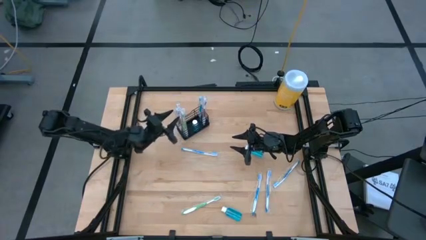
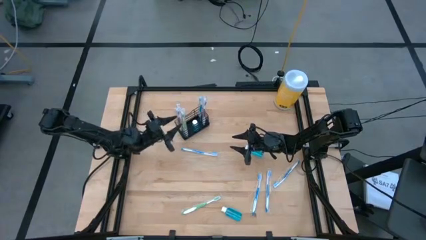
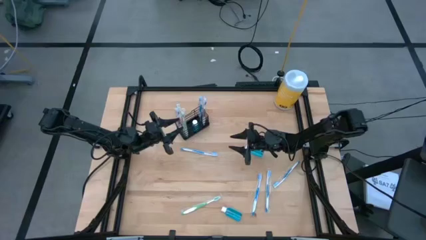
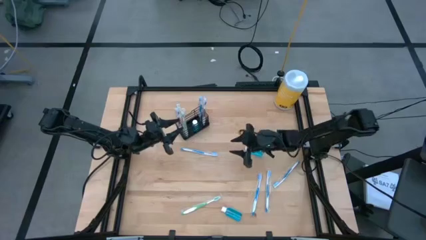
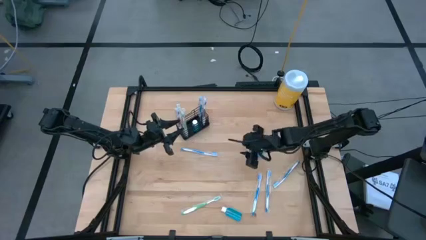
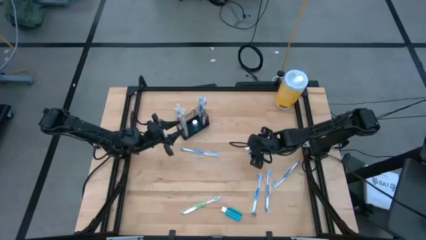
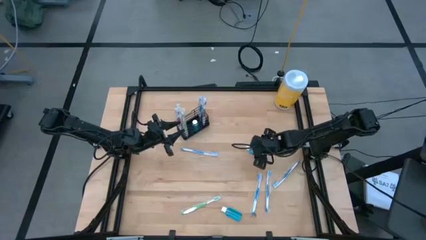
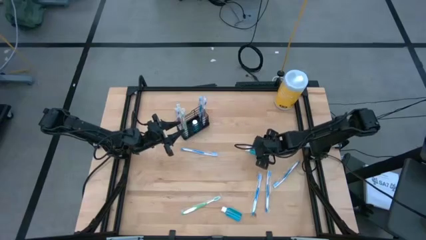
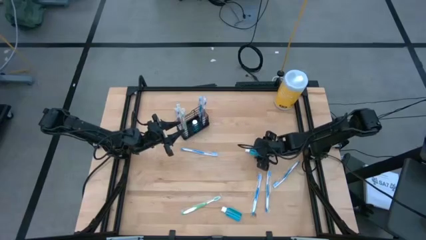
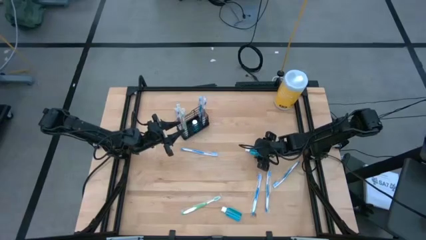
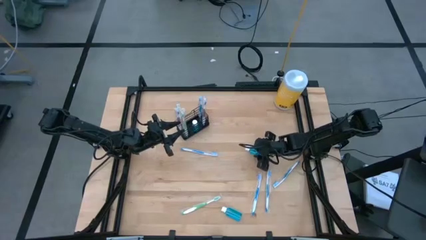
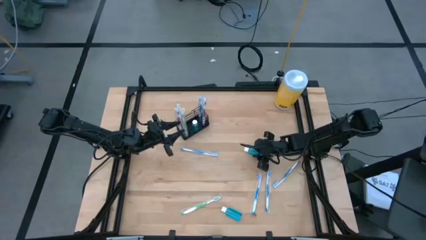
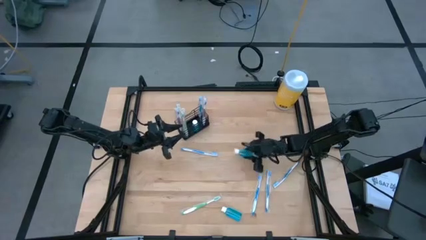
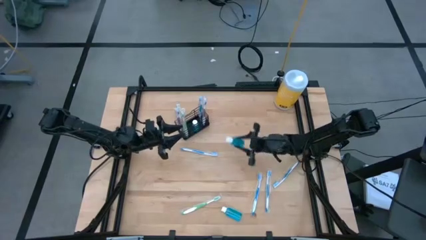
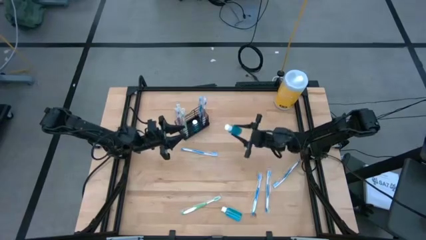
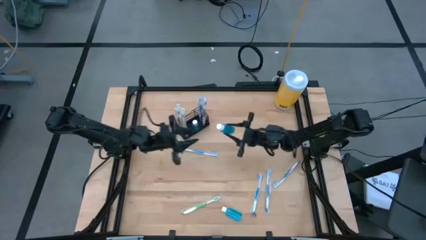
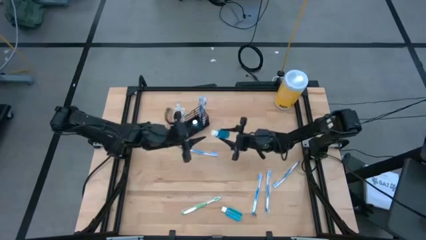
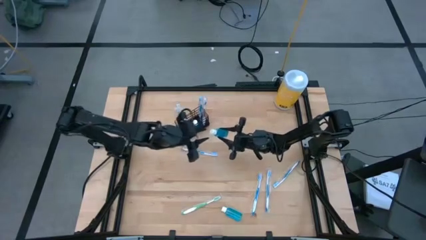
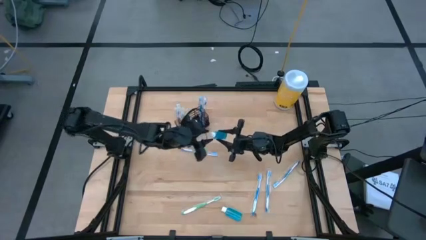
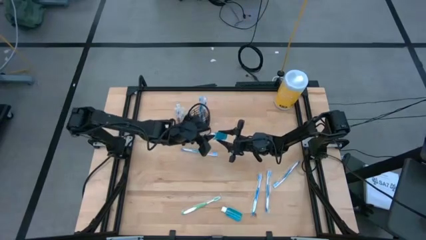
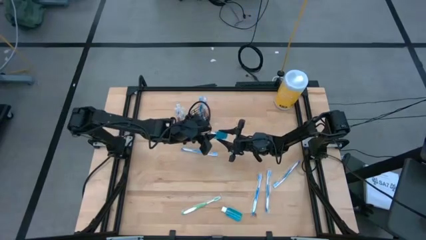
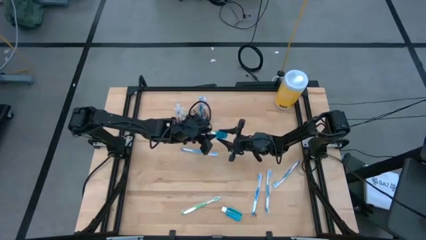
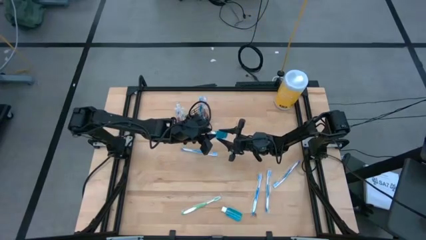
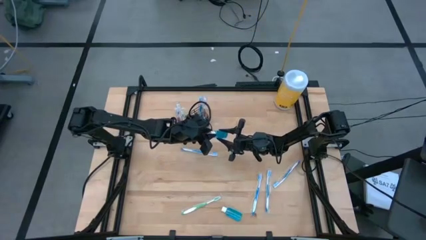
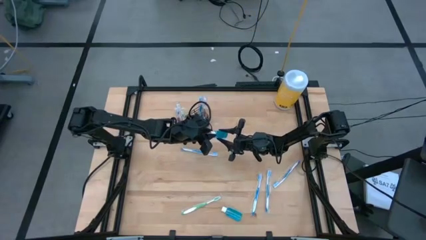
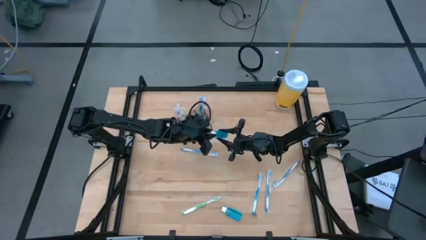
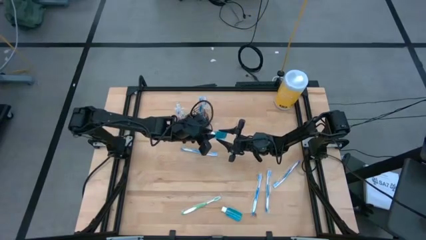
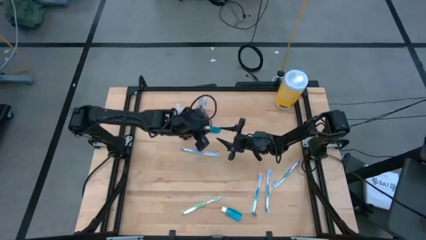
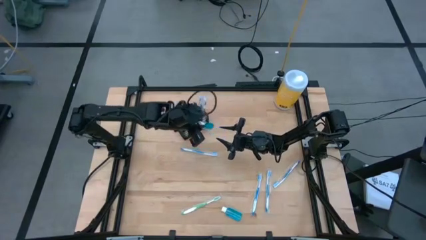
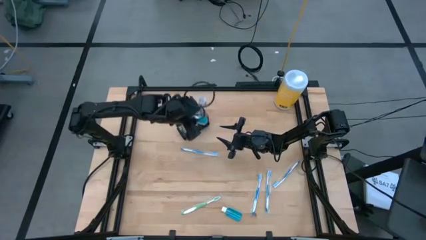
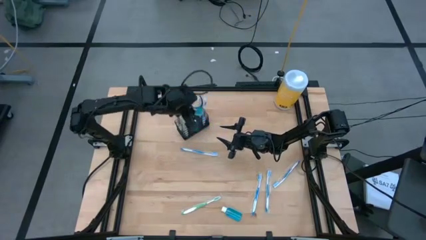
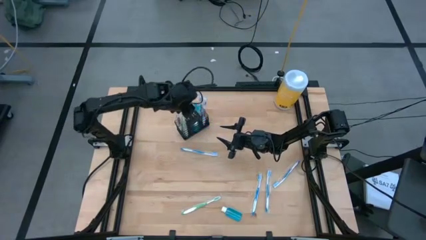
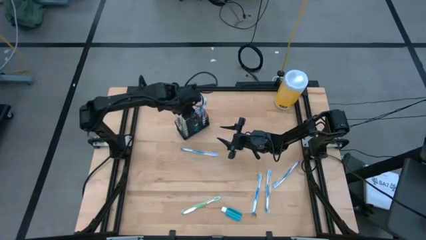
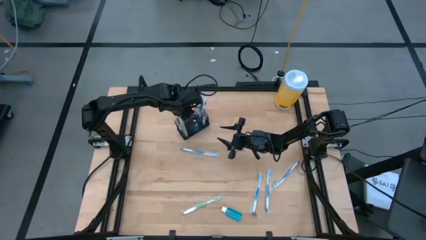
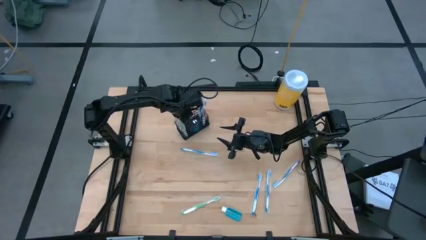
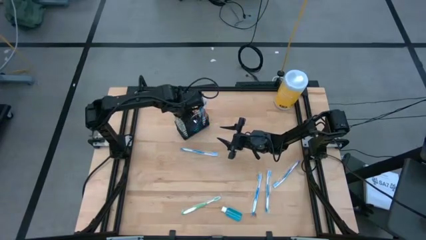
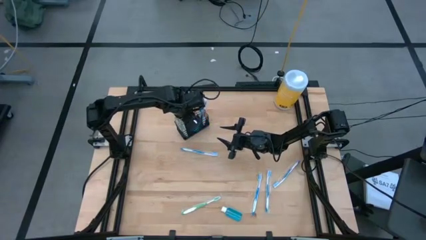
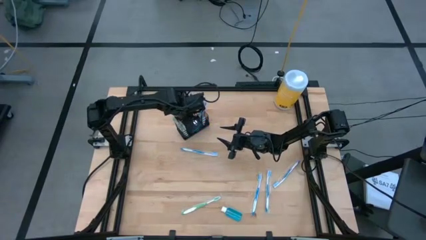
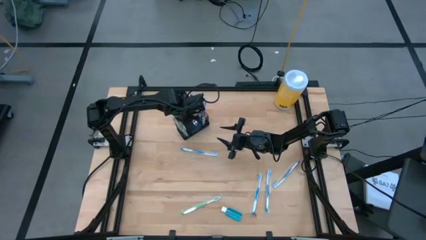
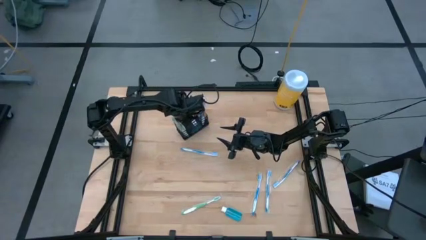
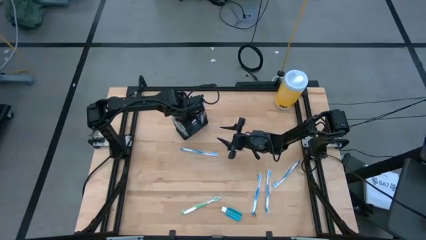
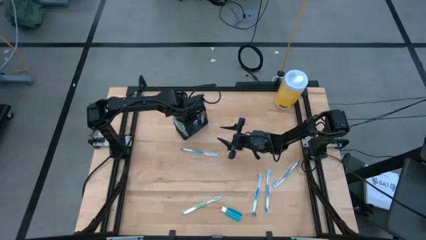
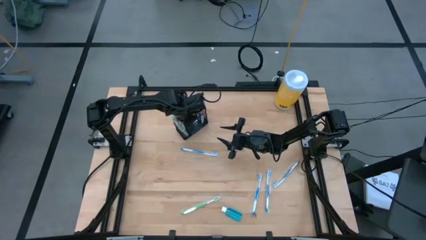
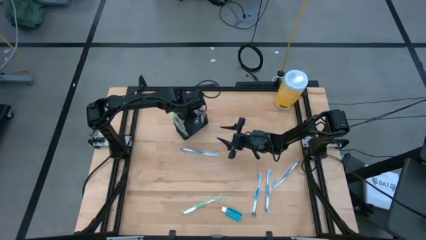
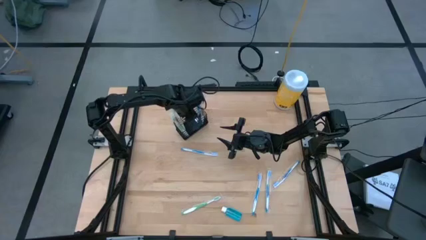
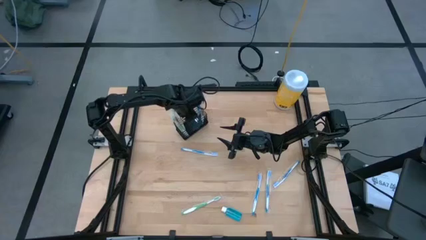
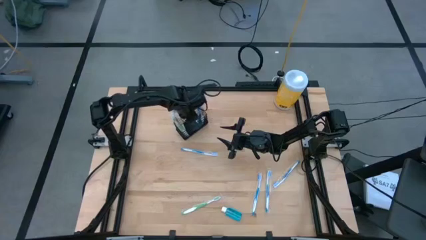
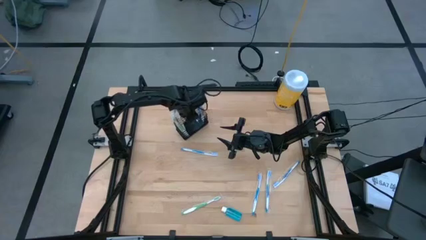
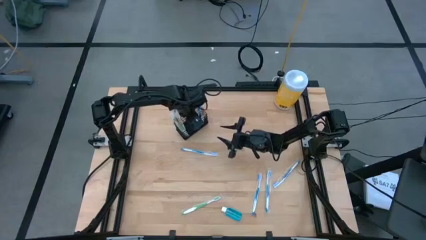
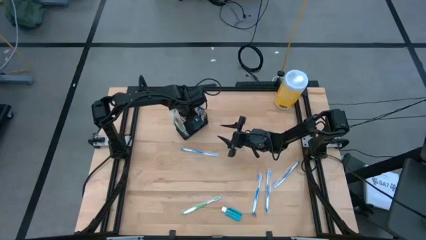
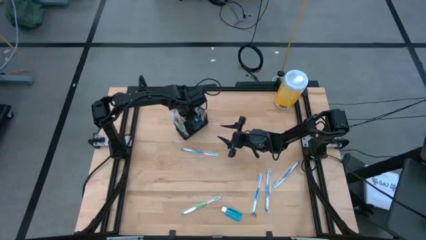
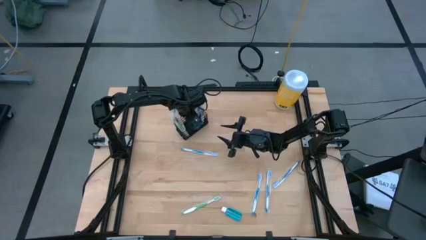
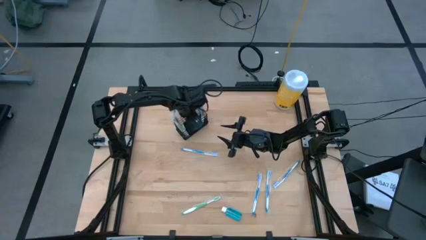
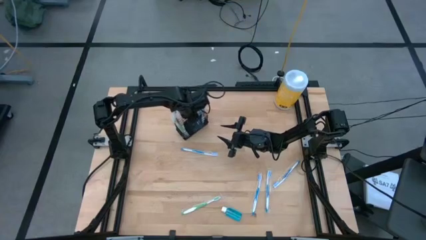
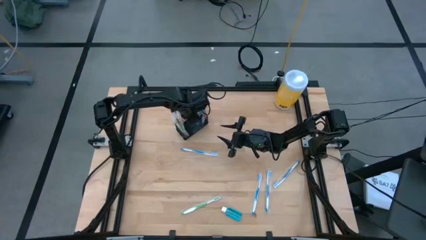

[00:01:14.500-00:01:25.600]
Task: Pick & Place toothbrushing station
Put the mouthwash into the black wire organizer

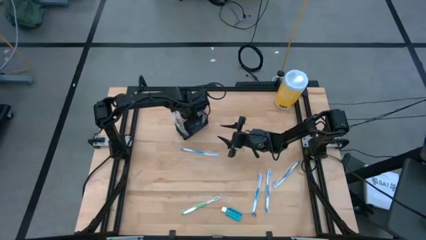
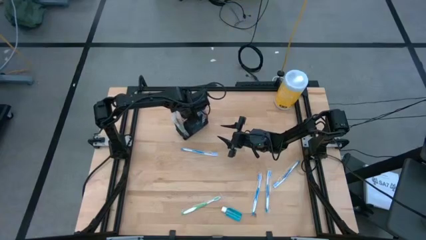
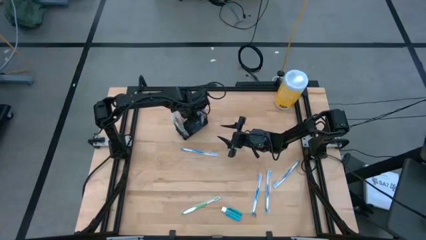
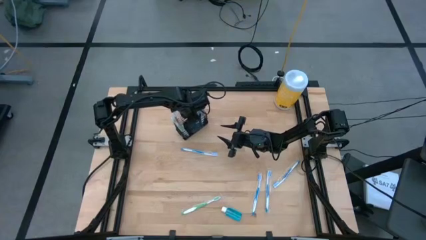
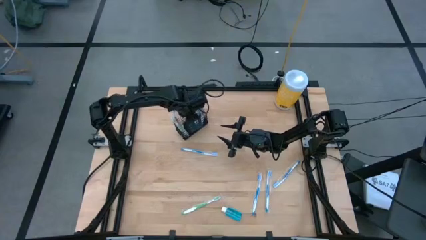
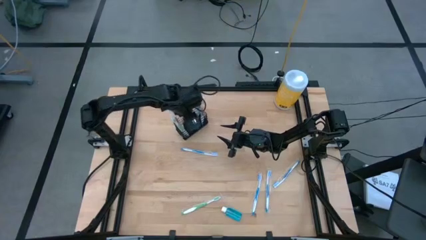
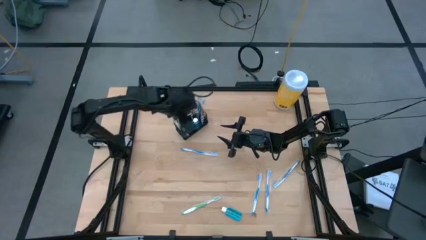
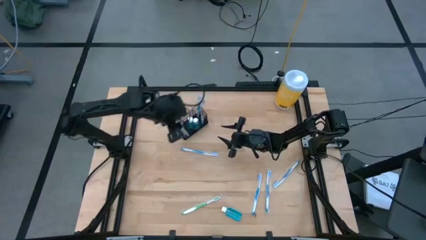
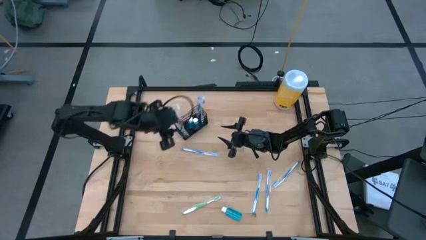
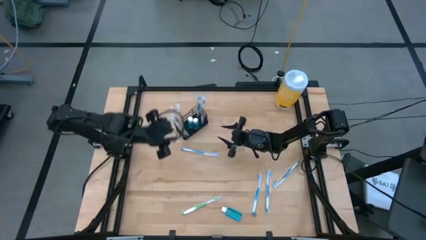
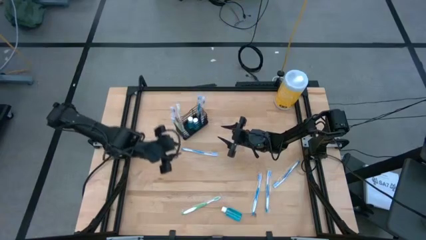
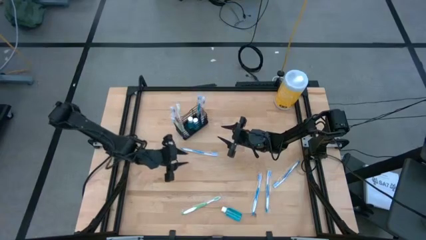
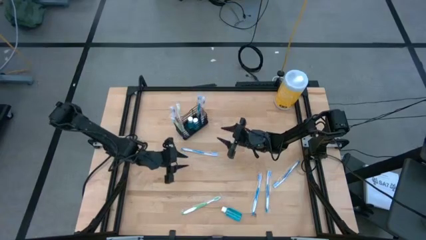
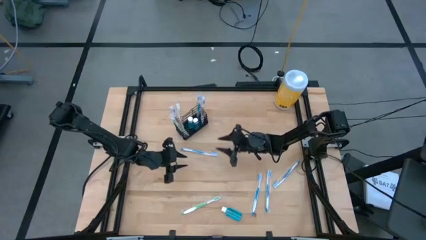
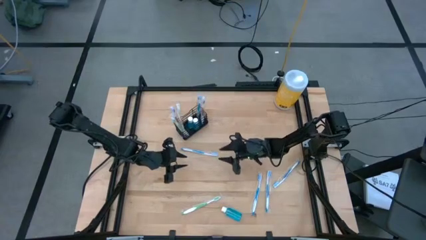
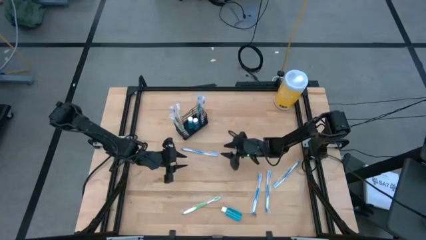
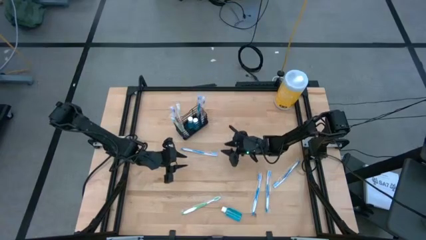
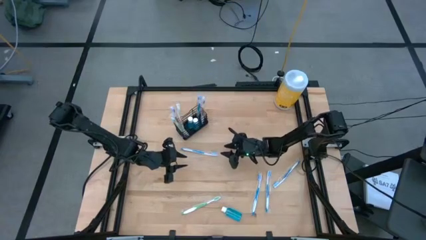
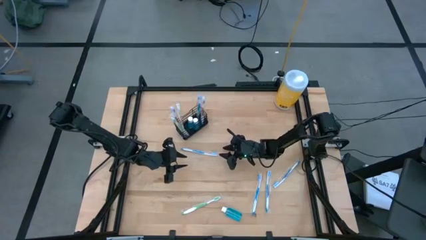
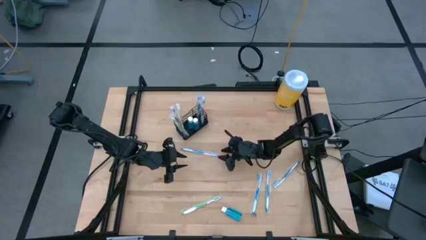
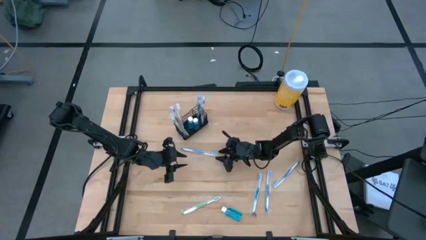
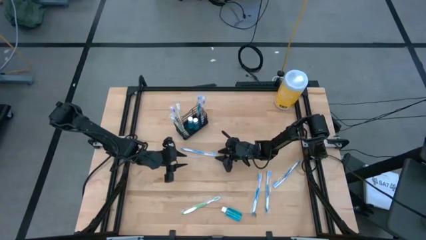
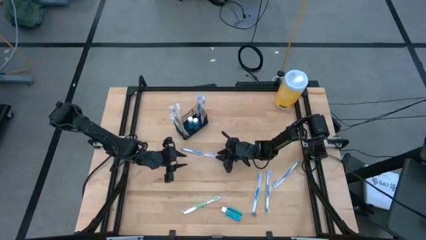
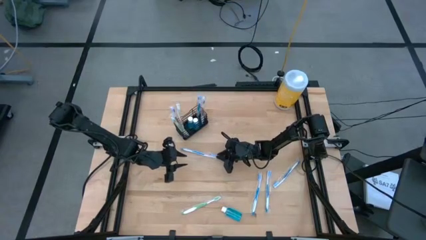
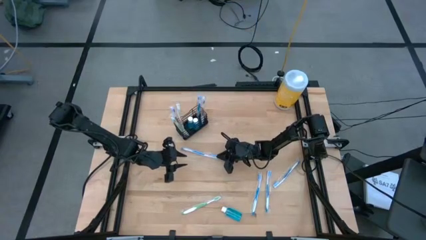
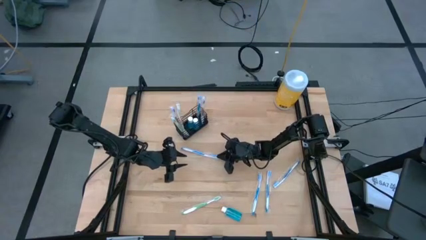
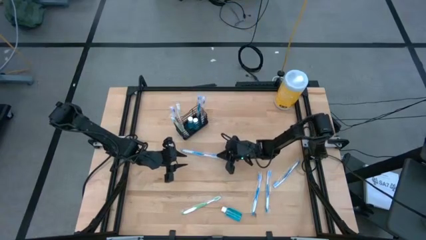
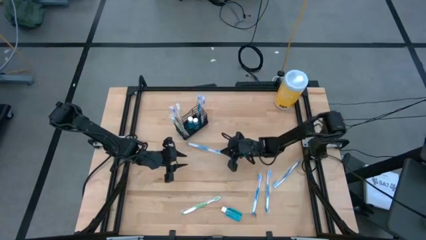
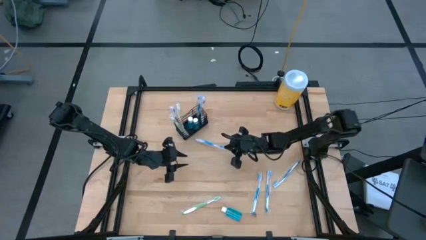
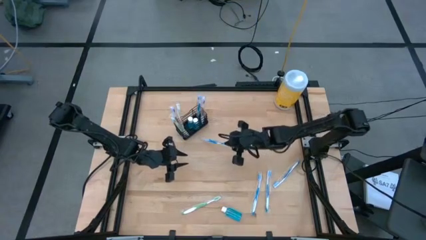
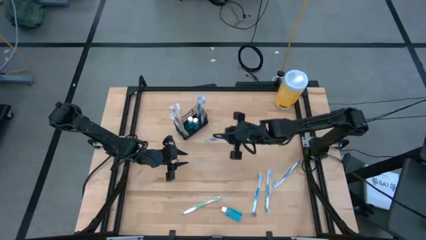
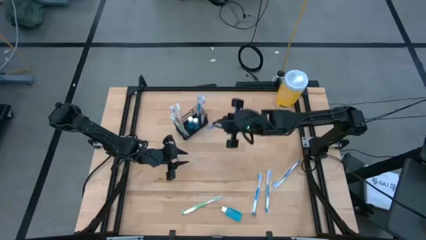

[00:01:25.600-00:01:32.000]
Put the blue toothbrush into the black wire organizer
